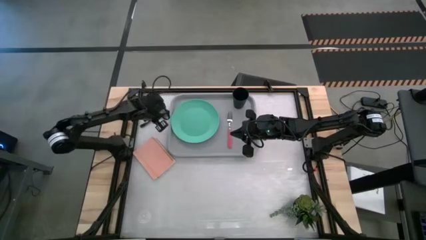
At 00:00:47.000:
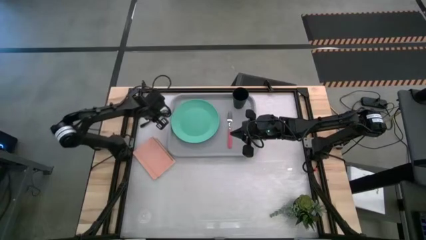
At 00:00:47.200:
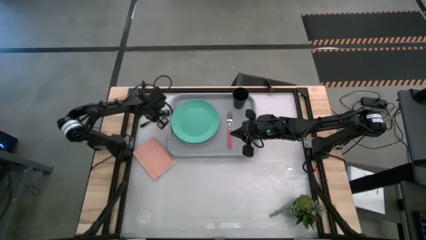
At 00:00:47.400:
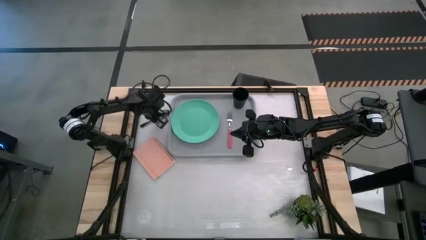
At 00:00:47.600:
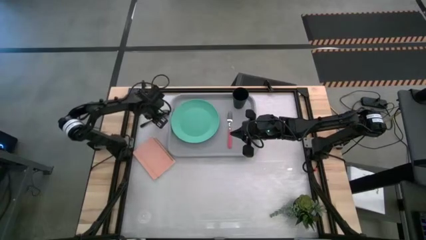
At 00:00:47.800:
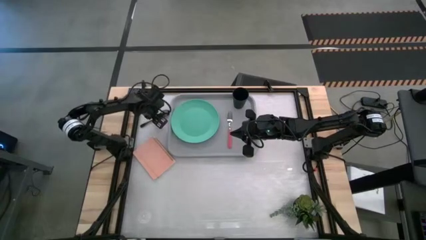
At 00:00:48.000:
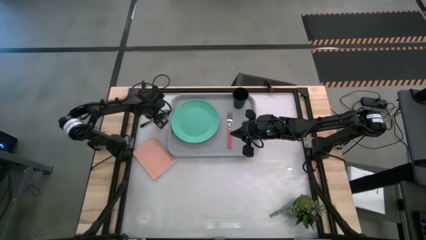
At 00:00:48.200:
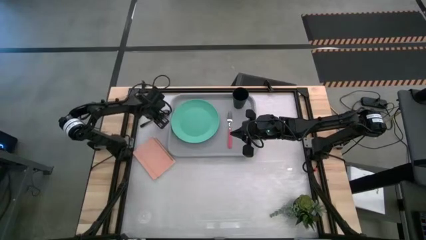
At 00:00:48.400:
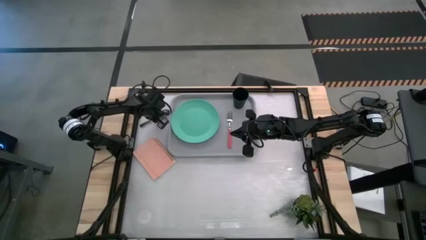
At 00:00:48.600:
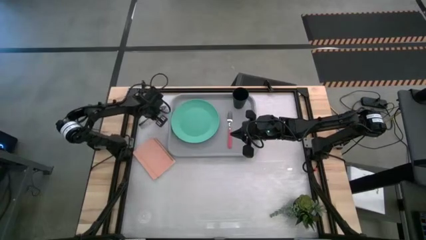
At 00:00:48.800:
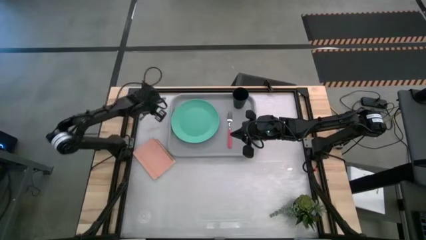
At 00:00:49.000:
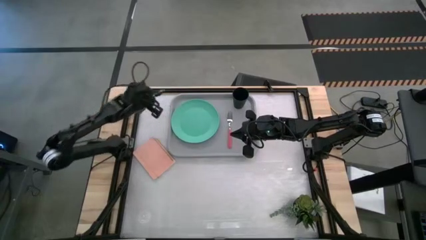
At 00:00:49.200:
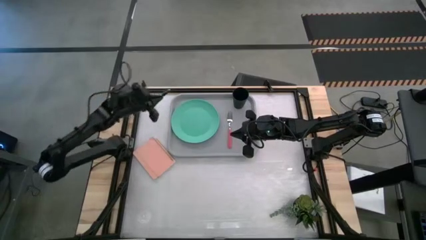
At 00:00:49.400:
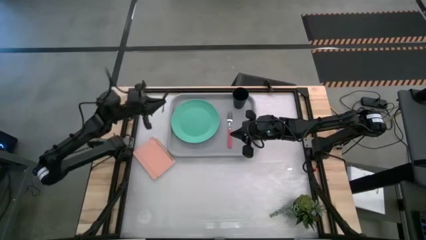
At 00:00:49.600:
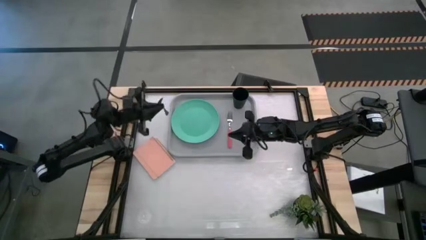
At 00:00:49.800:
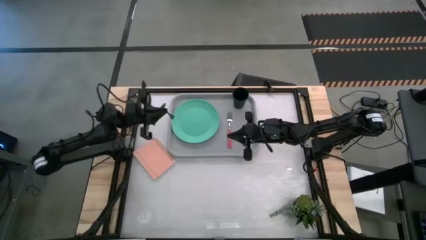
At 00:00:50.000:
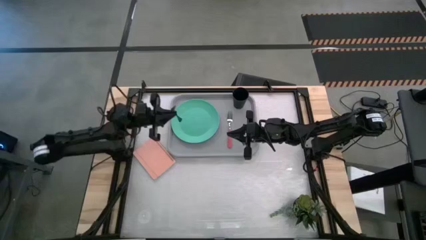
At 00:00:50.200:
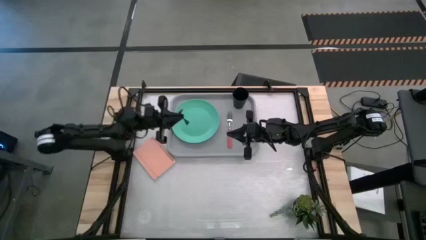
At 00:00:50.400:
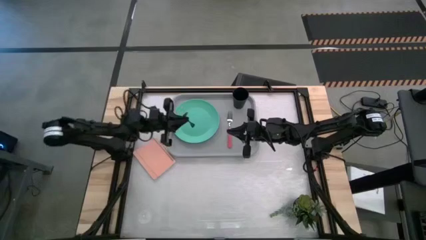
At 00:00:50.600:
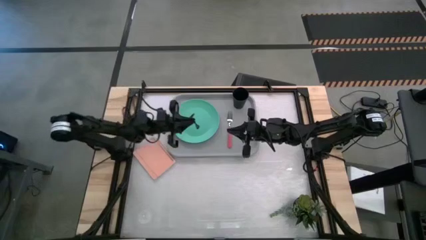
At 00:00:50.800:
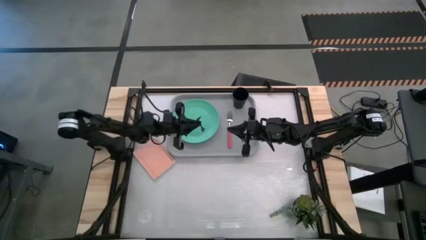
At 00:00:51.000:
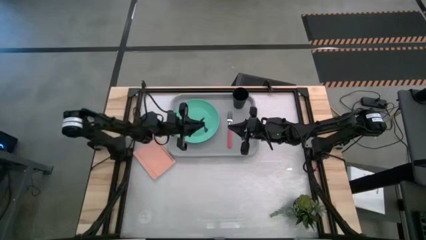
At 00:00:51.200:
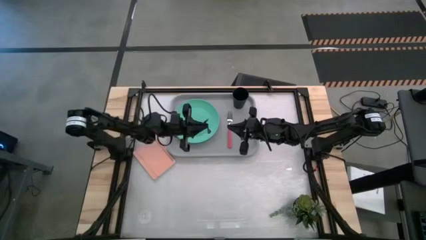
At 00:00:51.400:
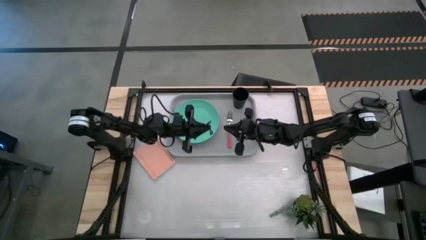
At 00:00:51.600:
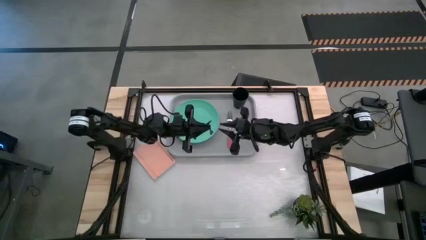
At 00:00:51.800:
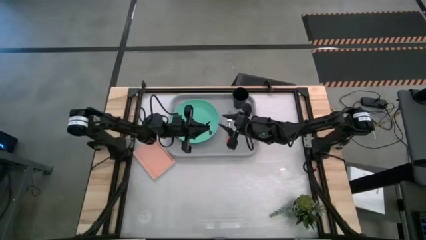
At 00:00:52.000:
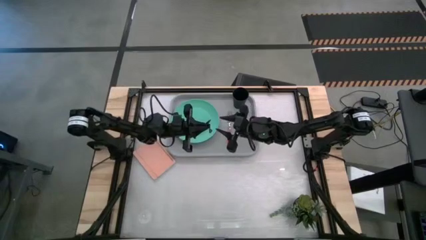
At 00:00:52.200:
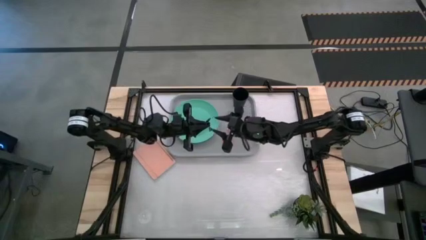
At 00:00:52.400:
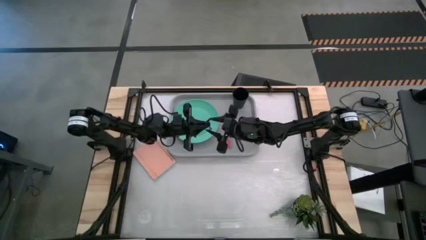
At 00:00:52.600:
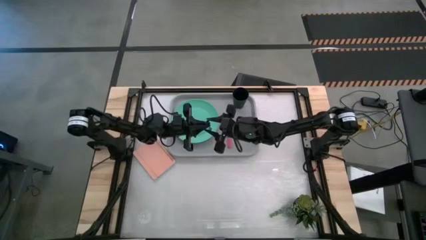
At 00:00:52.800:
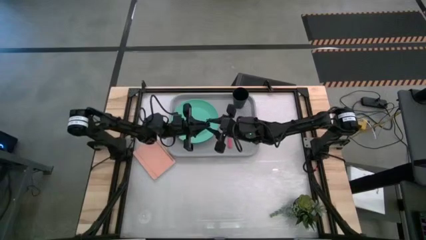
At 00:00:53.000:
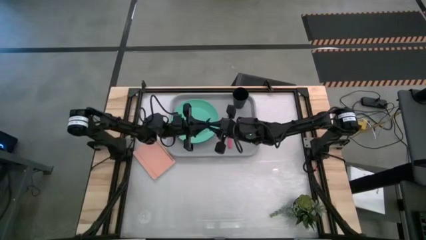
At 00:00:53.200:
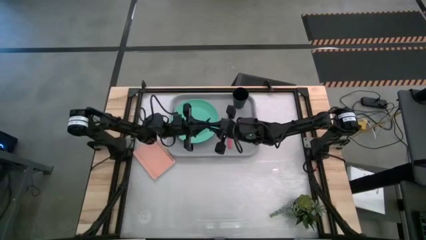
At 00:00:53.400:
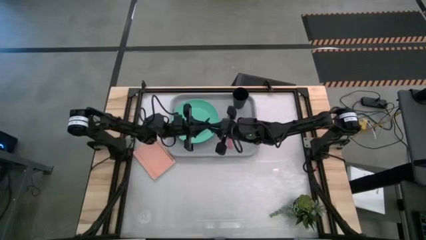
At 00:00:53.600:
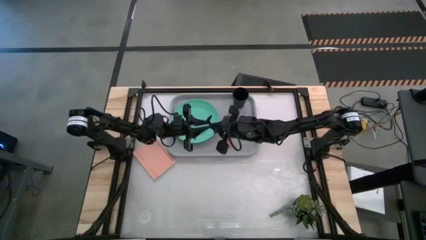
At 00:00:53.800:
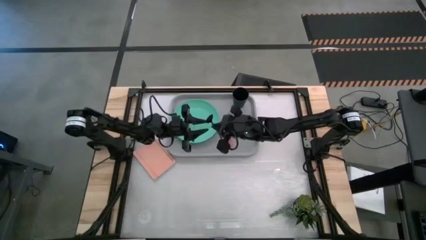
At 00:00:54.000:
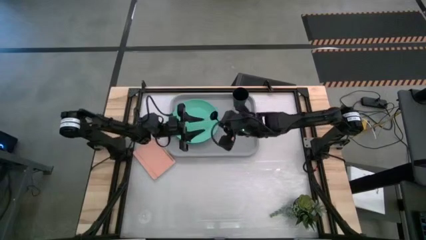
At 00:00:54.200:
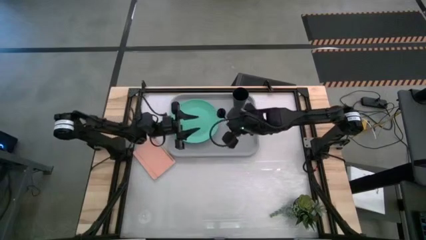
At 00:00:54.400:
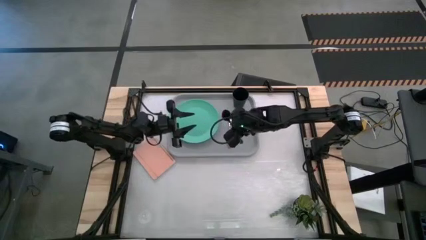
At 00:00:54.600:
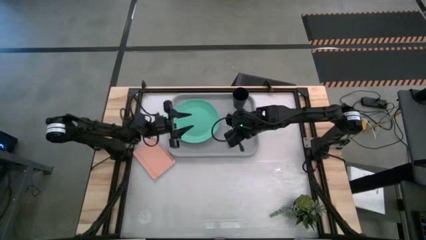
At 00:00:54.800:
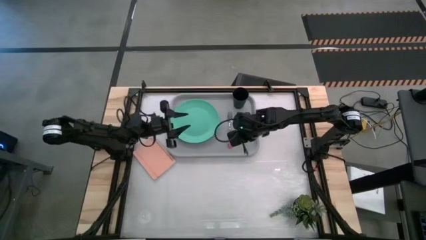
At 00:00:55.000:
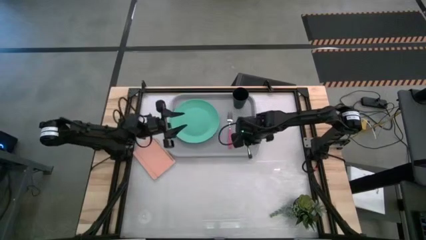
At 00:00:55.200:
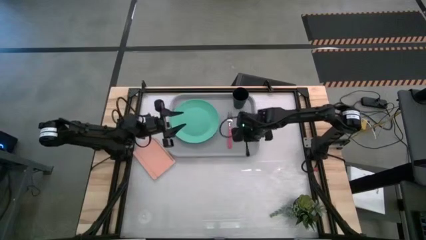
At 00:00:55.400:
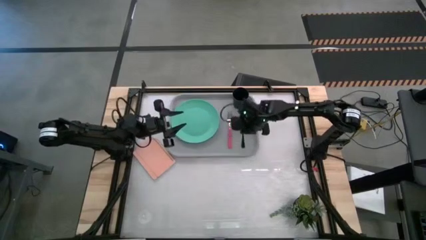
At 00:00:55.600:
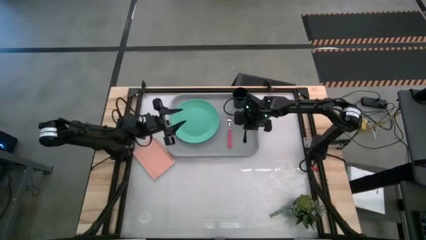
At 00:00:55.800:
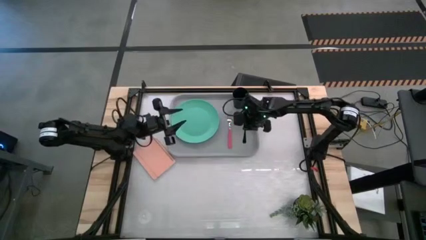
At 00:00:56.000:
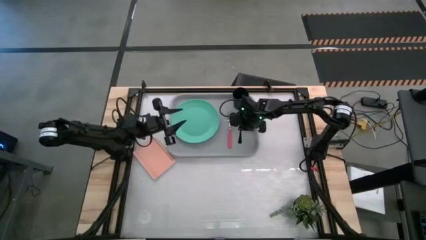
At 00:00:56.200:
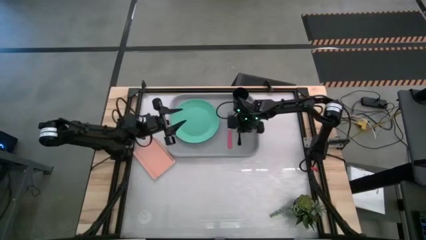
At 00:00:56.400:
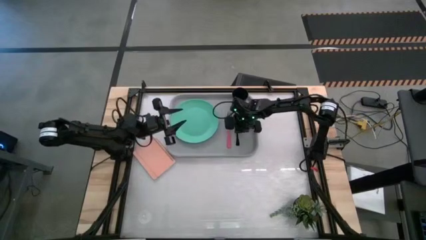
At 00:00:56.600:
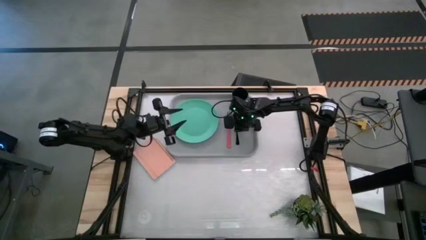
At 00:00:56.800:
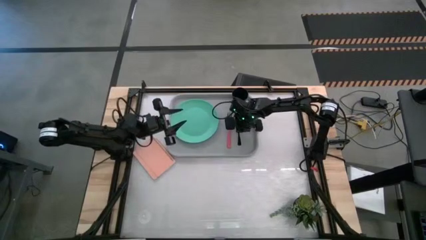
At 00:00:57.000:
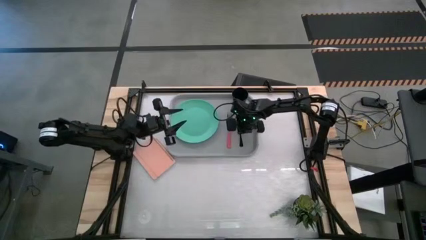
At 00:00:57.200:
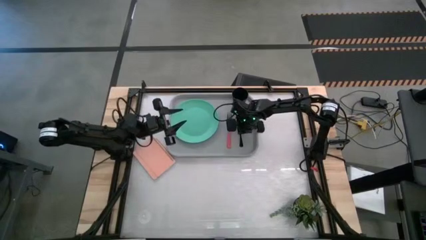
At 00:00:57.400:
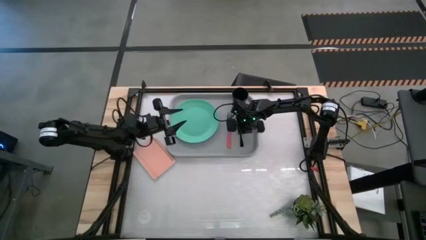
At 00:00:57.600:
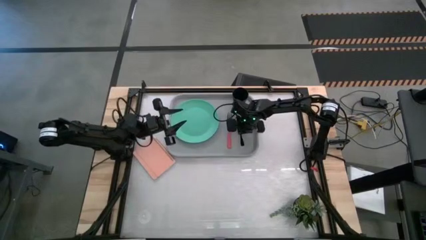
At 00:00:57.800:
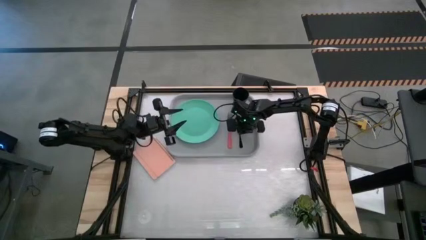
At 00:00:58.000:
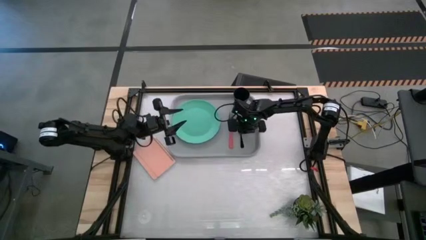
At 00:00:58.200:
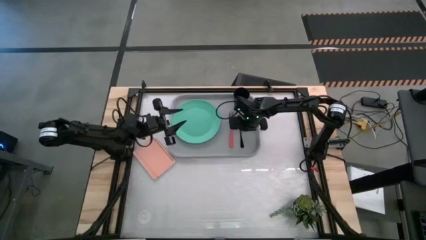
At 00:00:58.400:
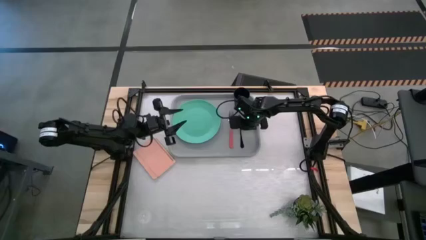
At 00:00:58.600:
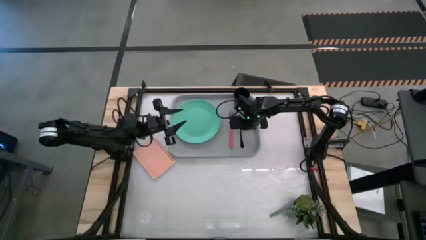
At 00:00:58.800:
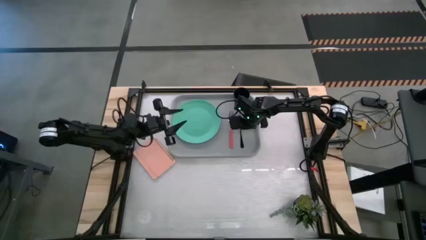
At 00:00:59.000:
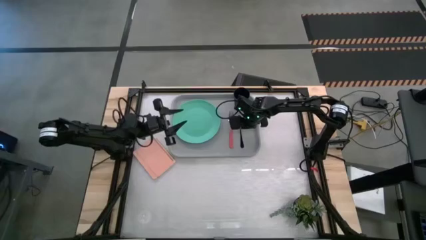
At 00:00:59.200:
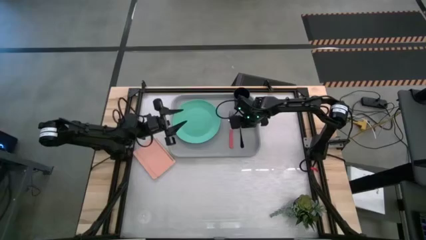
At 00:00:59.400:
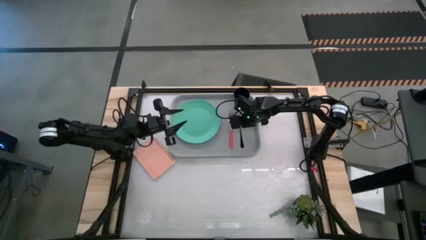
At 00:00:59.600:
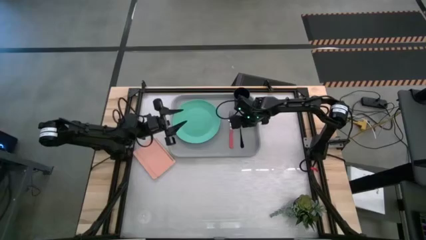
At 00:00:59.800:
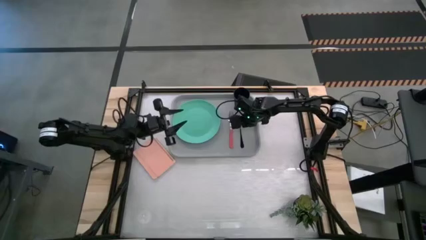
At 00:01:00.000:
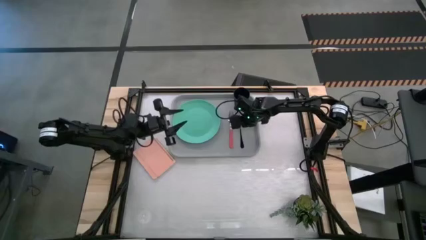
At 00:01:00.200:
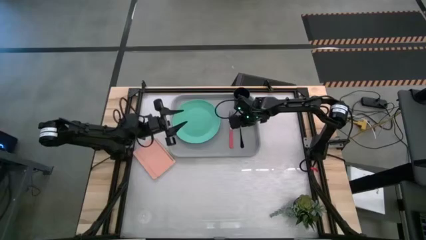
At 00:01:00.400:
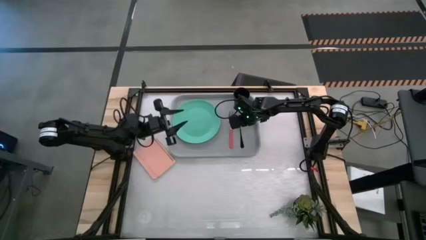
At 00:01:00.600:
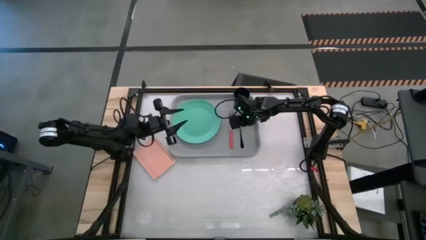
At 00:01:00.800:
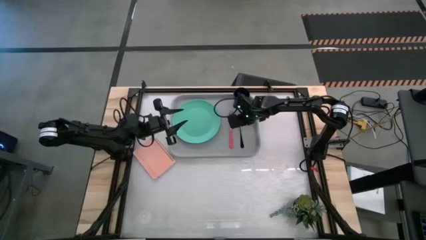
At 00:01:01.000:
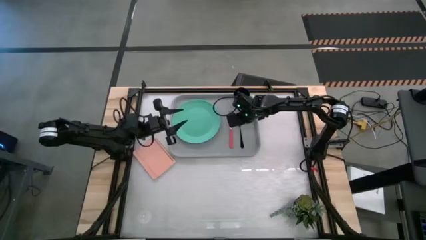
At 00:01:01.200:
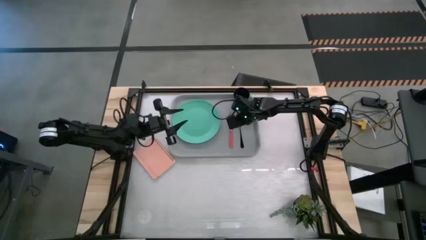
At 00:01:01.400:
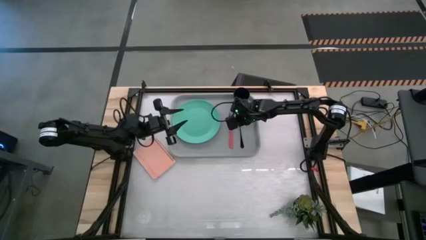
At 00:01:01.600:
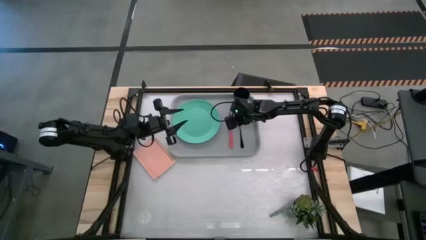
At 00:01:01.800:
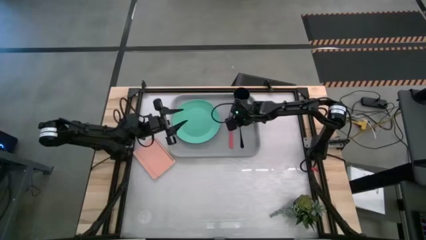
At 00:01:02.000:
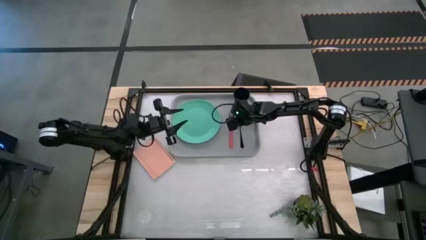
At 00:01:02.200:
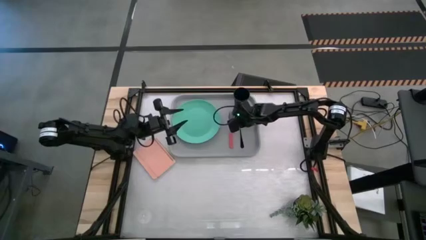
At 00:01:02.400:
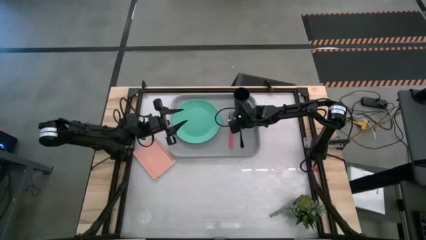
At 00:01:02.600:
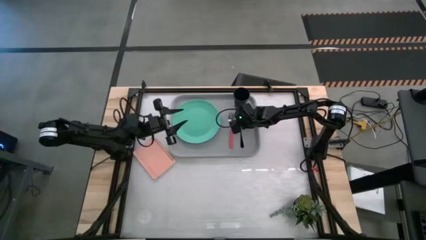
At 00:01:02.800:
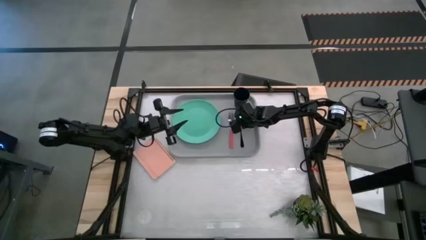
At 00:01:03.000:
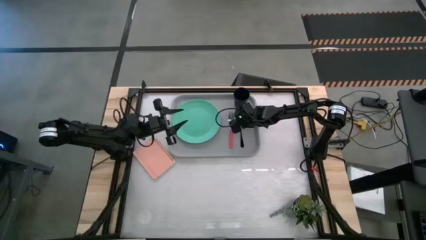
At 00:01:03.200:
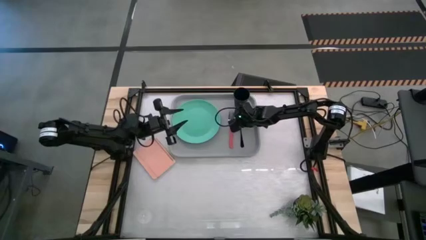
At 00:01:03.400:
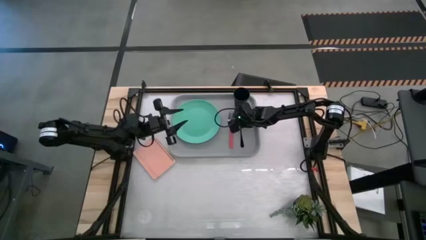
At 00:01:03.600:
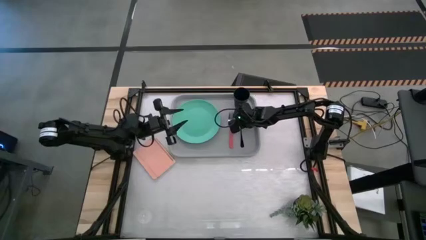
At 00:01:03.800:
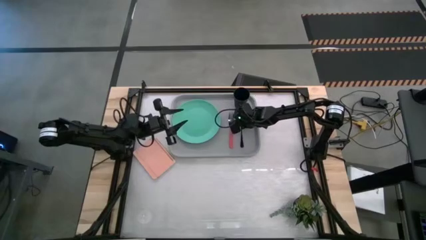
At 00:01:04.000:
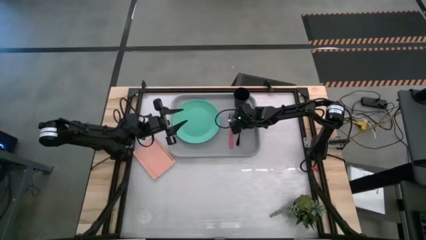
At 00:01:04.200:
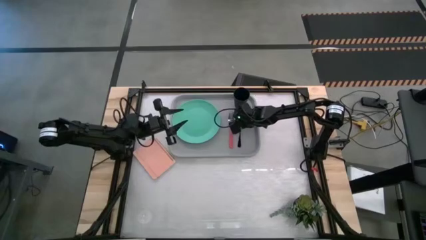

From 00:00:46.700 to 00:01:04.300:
Task: Pick and place plate/cup/fork/spoon on tray
Put the black spoon on the gray serving tray to the right of the pink fork
